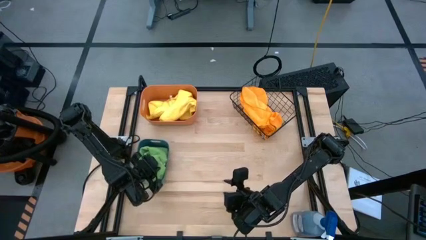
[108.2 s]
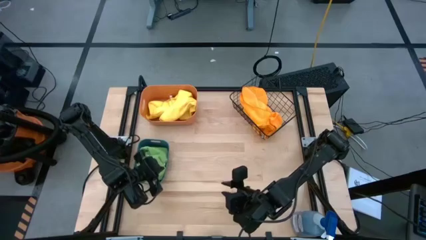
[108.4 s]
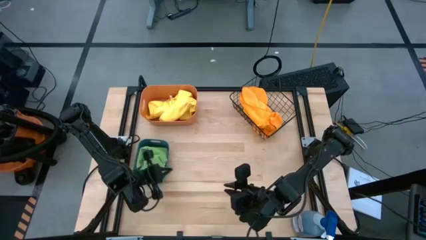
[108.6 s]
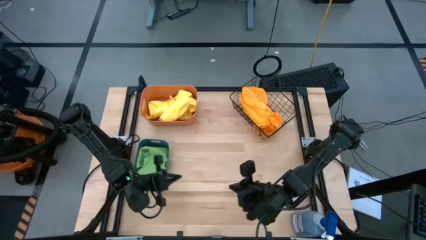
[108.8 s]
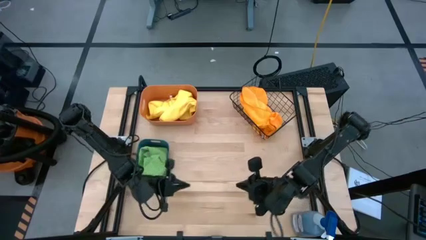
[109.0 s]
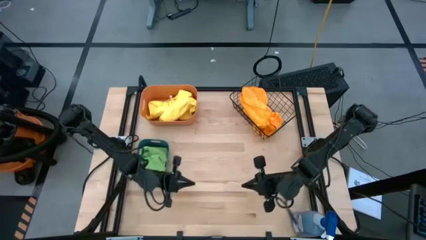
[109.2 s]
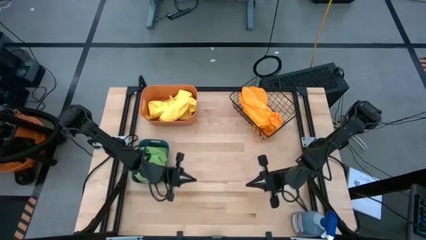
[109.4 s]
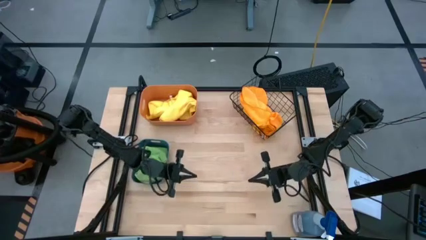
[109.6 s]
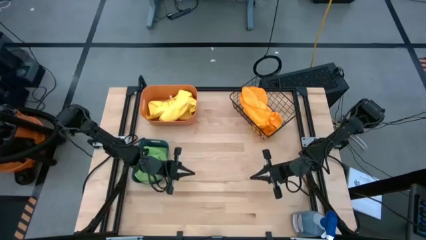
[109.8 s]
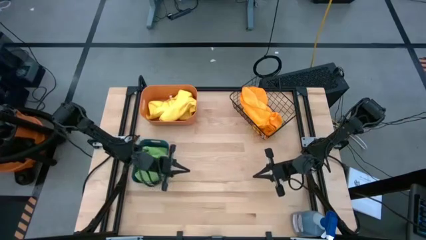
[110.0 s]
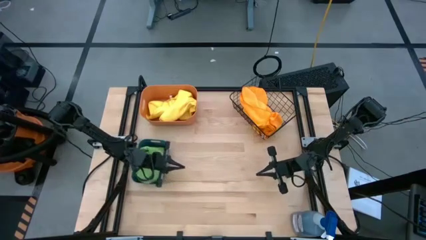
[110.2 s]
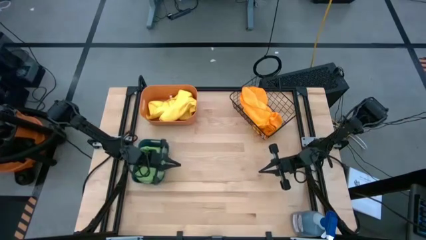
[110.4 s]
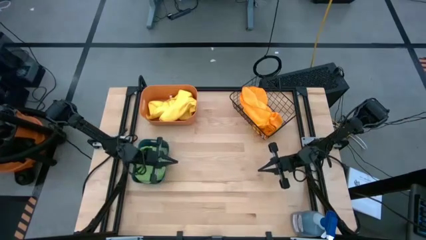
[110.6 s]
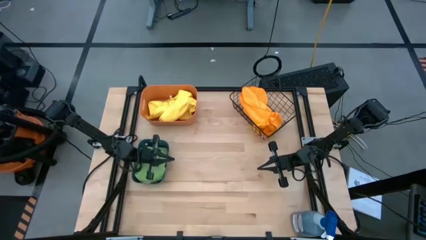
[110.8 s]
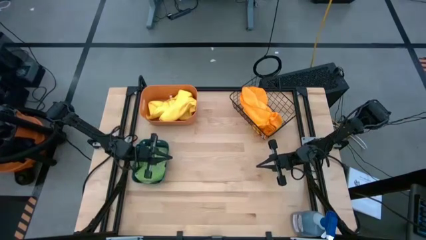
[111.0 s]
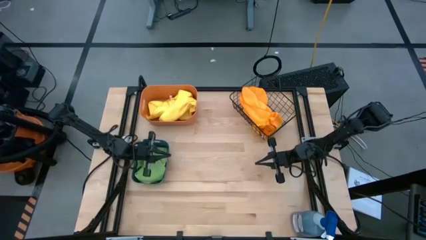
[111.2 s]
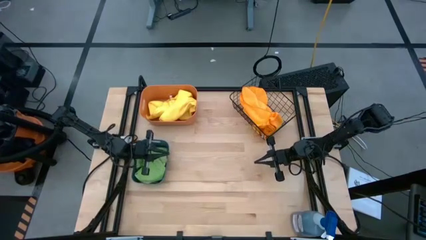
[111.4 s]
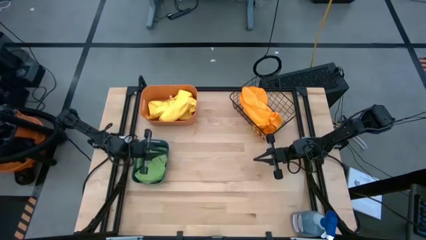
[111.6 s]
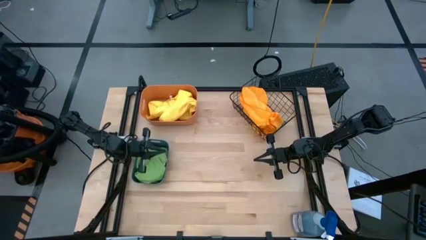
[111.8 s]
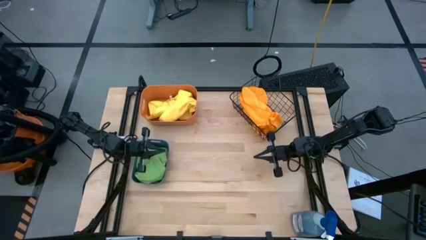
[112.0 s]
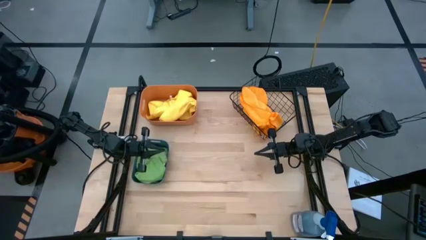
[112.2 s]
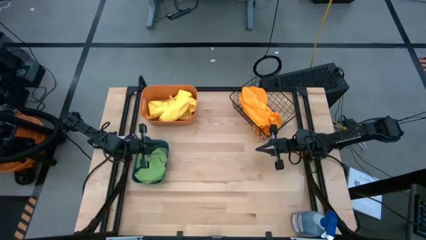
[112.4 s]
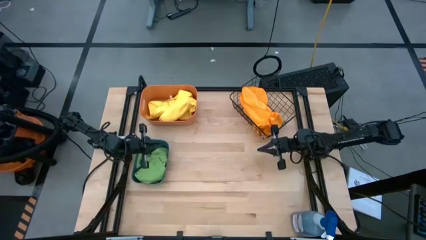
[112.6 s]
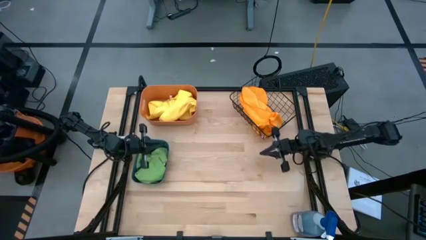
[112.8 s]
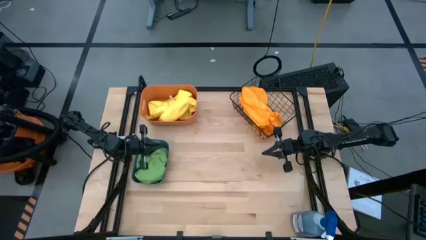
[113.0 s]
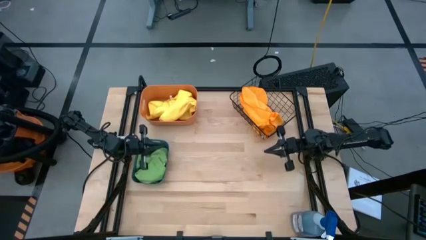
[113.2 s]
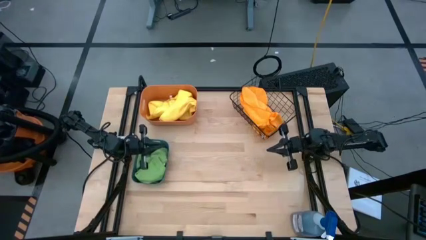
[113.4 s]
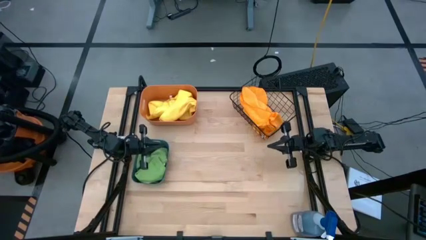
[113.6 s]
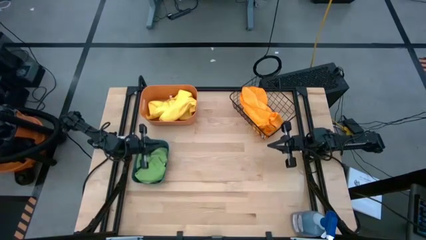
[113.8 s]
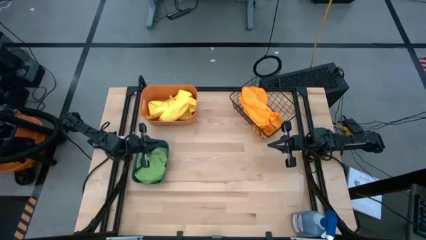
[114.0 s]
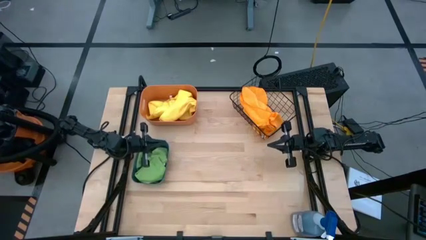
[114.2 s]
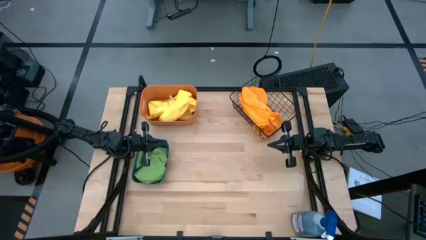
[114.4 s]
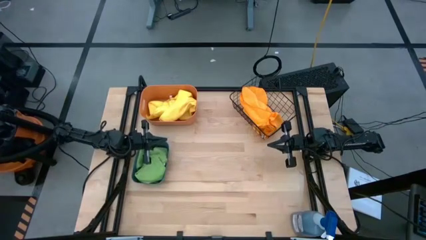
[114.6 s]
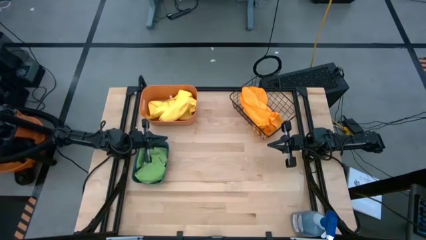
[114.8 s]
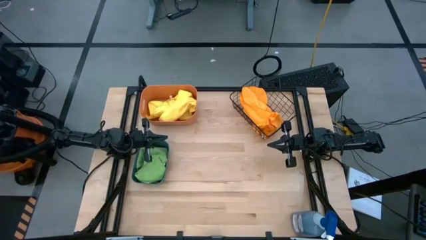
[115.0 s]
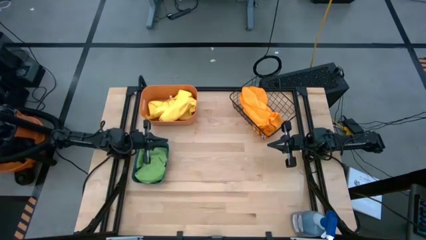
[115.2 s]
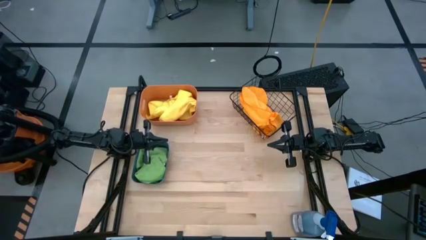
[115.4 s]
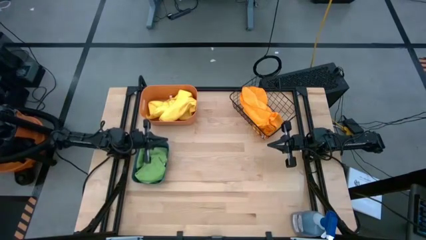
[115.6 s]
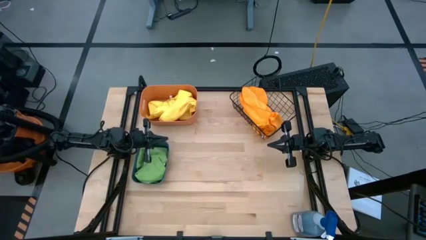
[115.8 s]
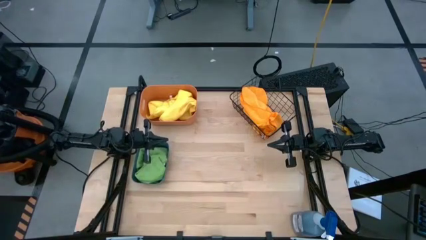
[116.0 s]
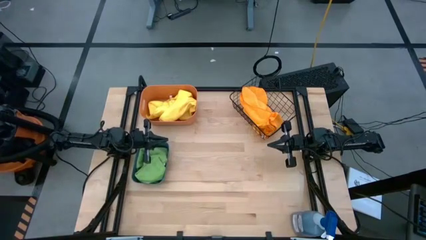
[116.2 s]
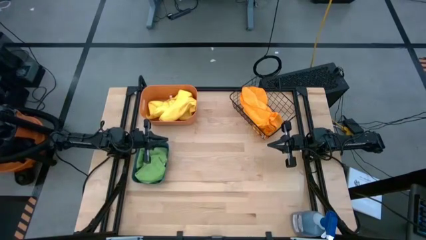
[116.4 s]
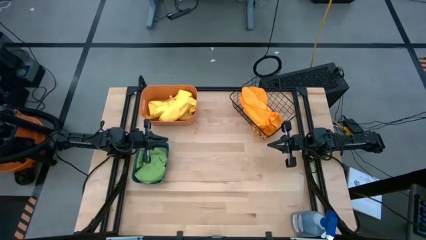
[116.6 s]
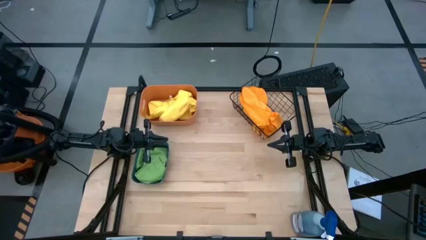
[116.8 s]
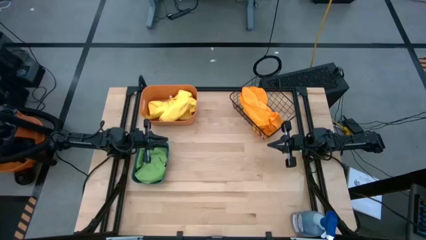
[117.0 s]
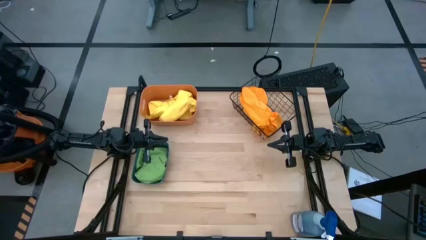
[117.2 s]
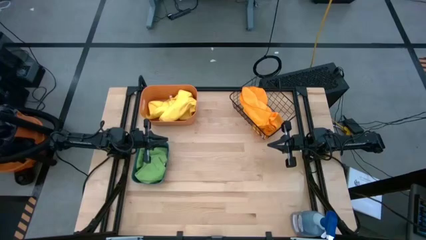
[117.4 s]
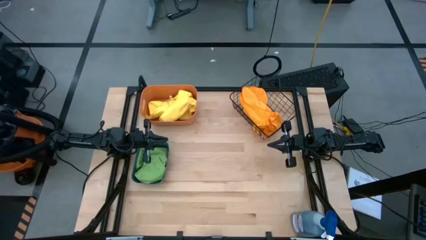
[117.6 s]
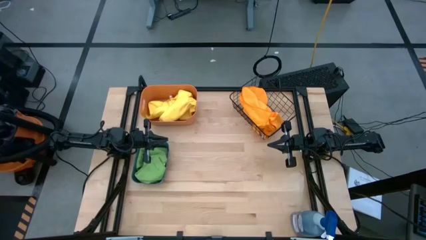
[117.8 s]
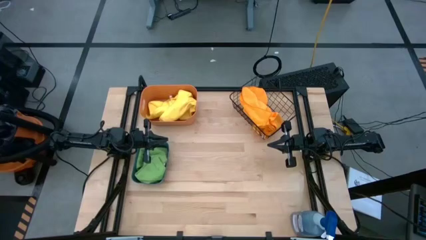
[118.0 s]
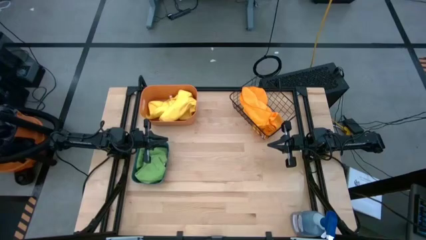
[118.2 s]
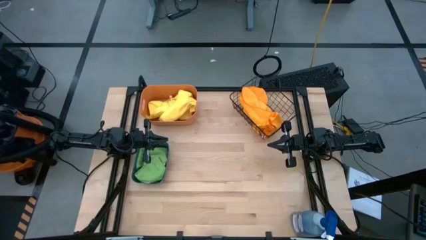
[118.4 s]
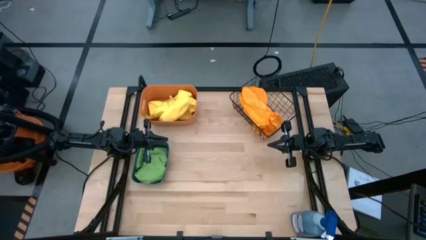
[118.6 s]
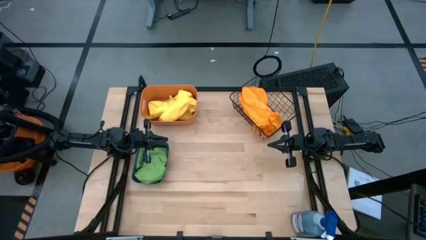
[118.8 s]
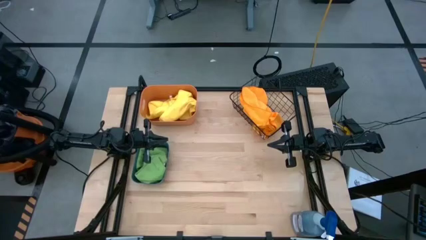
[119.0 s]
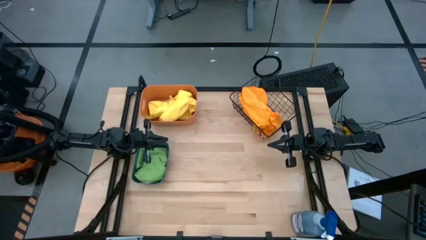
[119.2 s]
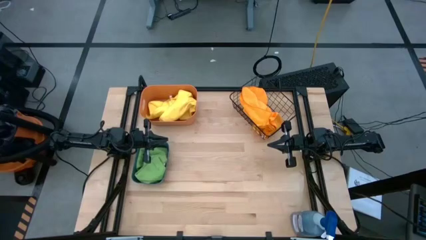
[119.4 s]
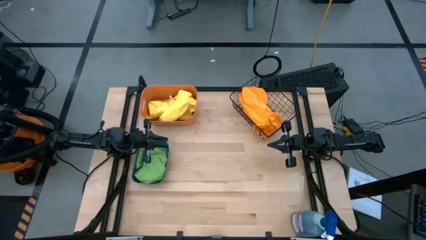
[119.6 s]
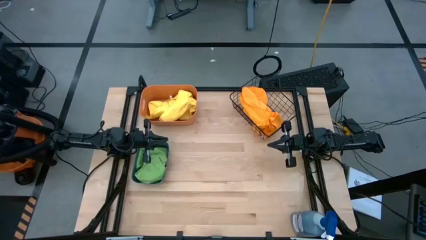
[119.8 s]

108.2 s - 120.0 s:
Task: Sort microfiber towel by color & place in baskets
Return to Home Position
